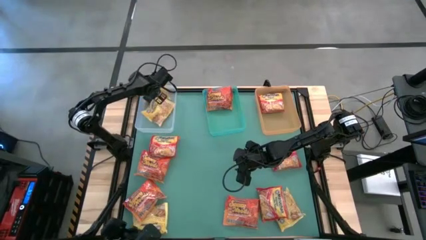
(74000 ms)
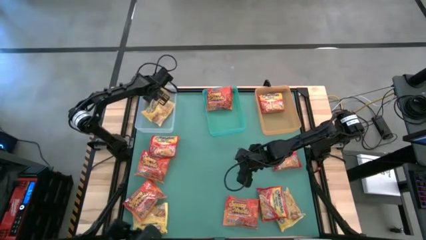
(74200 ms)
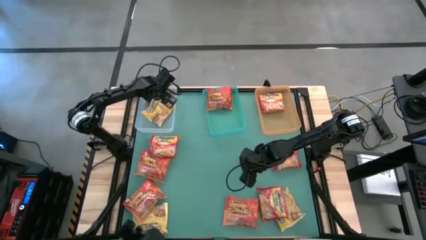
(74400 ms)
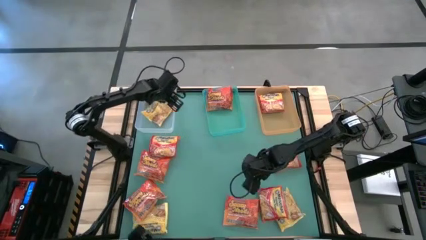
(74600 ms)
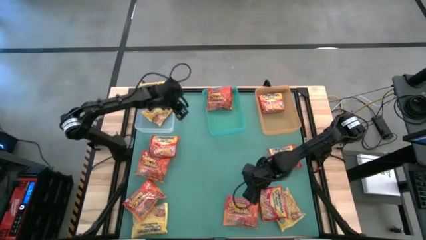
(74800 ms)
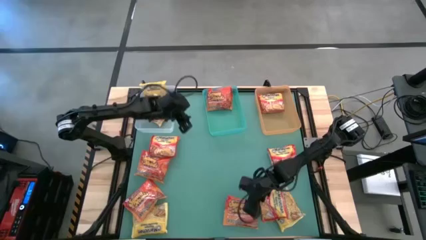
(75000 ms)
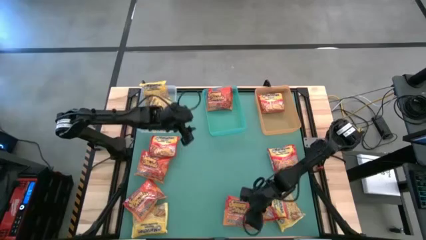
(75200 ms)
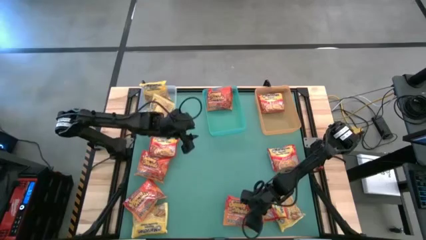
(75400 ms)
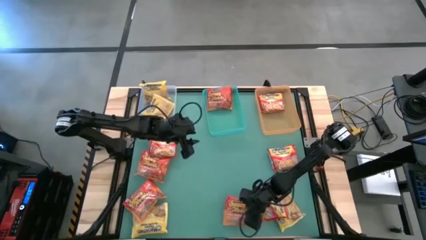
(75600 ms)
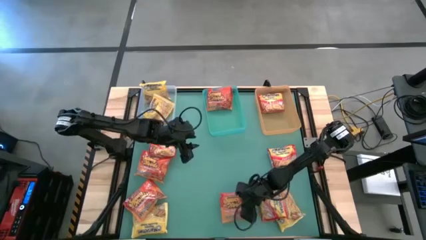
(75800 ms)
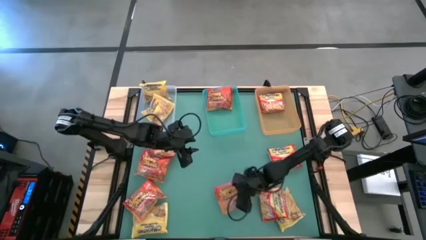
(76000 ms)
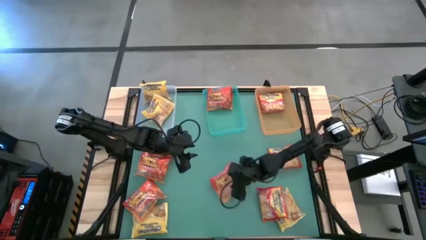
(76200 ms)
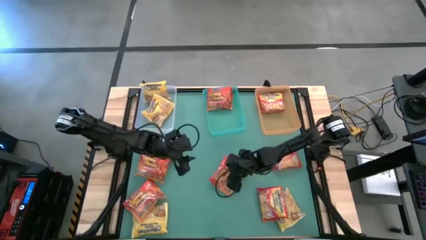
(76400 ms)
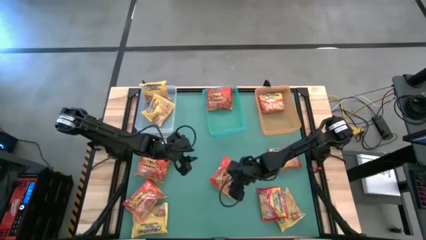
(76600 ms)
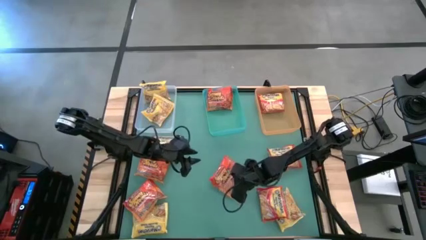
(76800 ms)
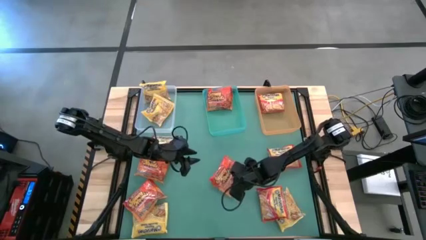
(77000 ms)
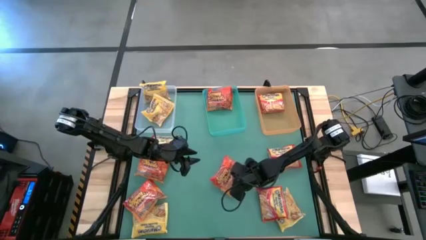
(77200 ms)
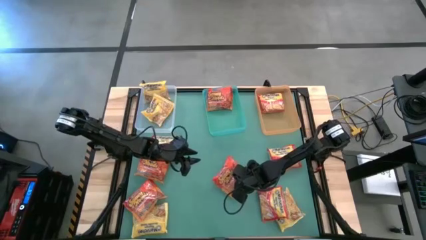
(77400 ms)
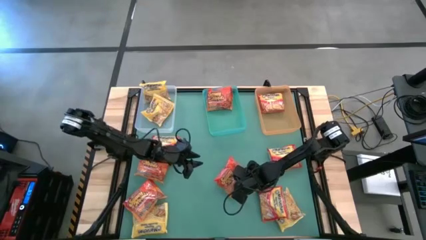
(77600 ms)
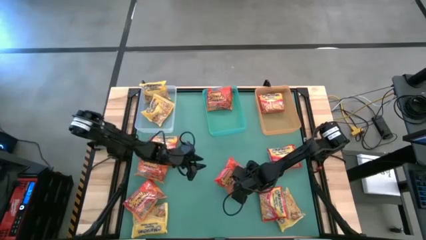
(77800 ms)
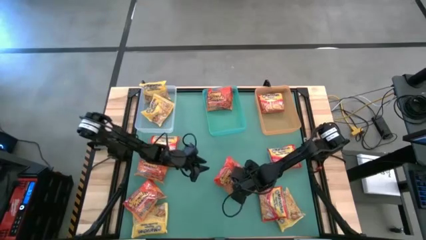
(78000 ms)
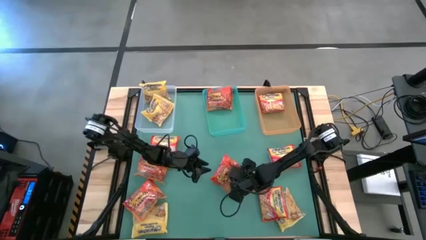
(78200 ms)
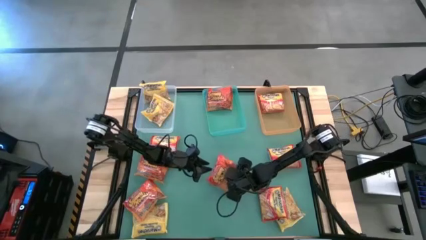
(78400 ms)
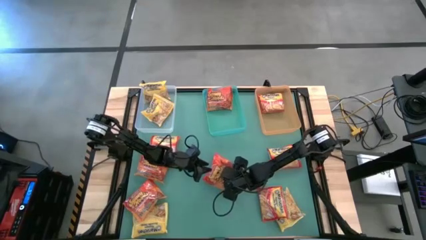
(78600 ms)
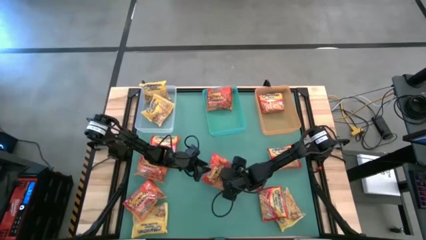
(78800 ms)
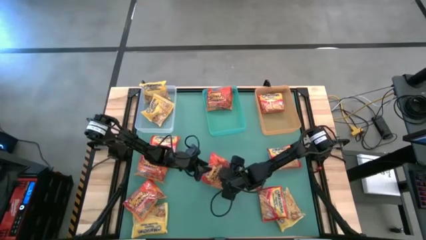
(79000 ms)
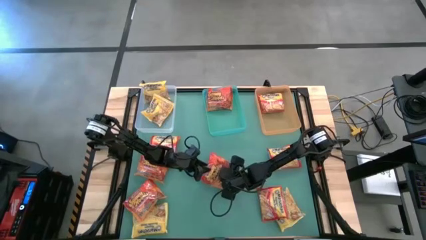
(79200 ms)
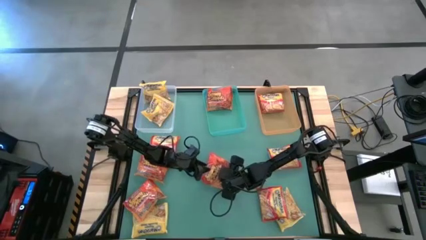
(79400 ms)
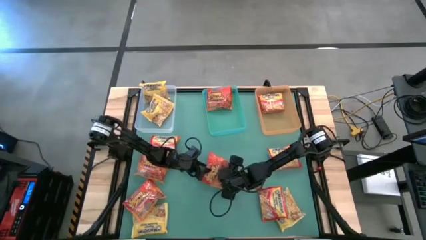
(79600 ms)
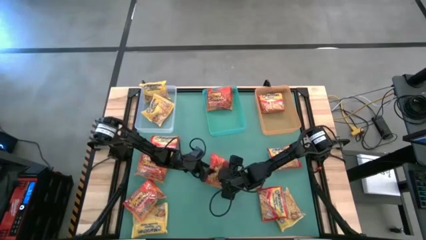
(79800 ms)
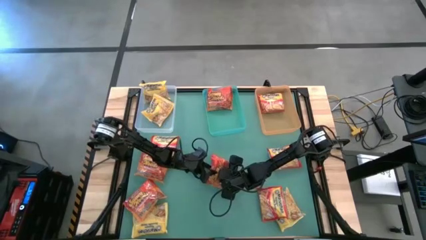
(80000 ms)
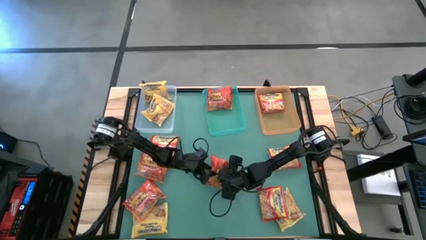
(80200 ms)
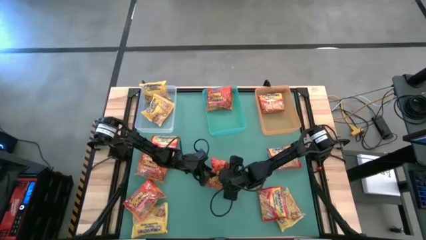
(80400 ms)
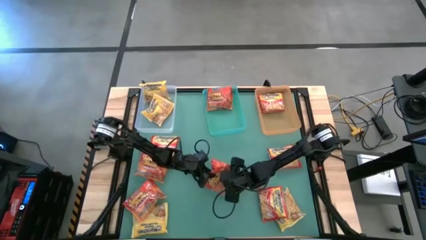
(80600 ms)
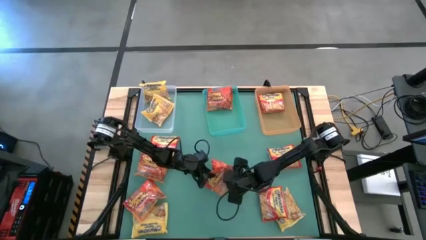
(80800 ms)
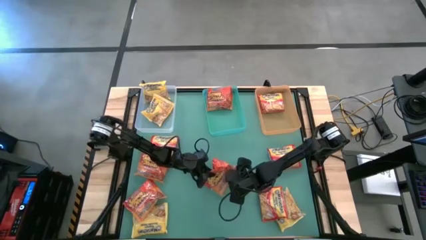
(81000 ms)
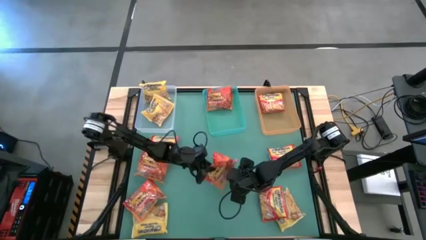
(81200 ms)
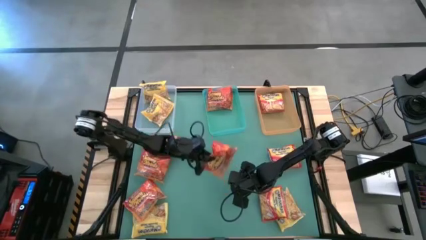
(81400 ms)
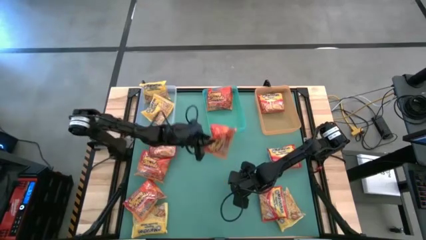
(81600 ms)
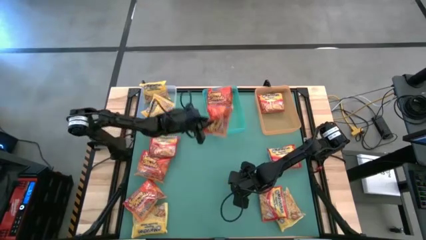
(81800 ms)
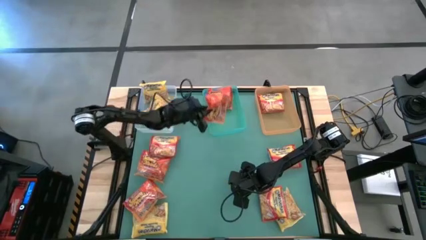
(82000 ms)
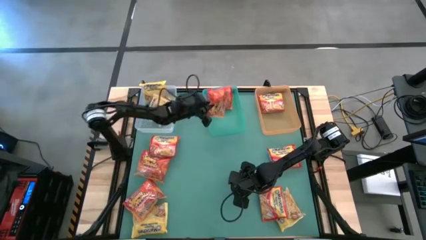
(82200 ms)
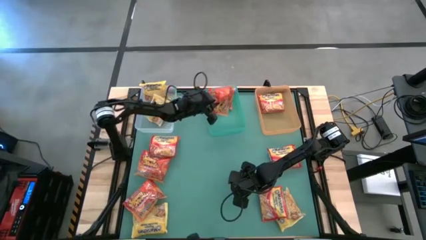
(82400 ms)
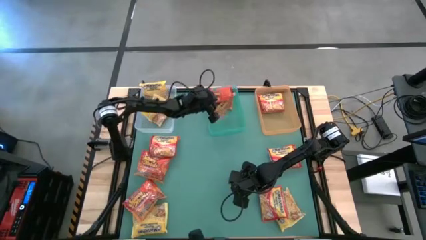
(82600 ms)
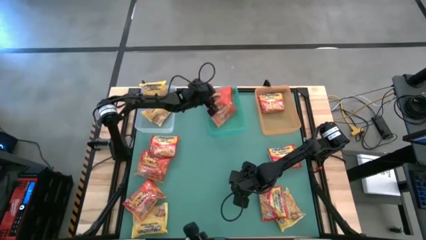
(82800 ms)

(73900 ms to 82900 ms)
Task: Sort Maruchan noodles
Put the red noodle pack into the green bin

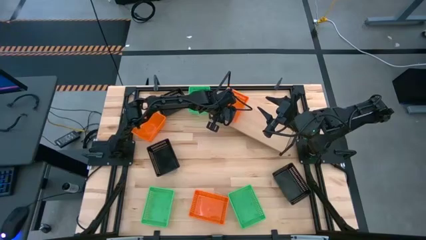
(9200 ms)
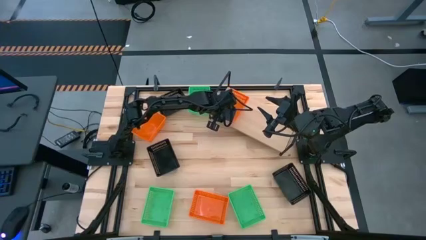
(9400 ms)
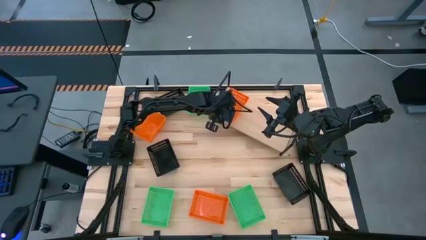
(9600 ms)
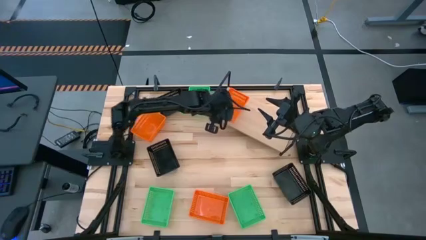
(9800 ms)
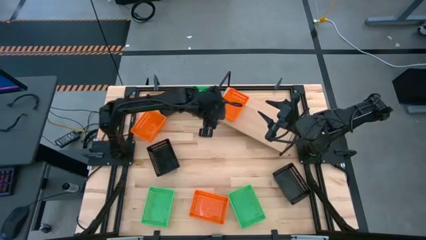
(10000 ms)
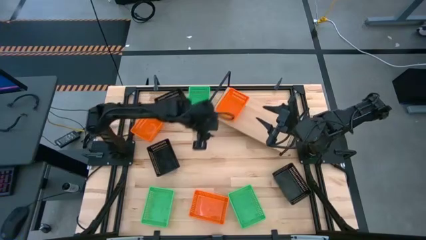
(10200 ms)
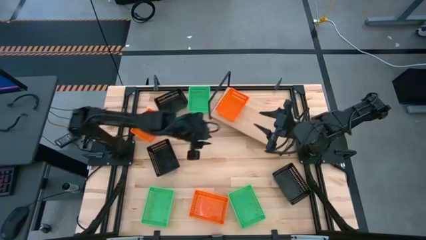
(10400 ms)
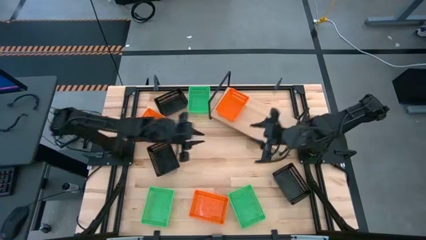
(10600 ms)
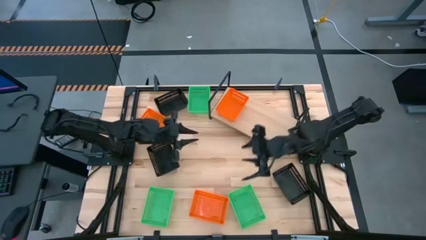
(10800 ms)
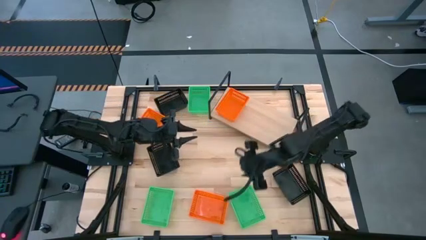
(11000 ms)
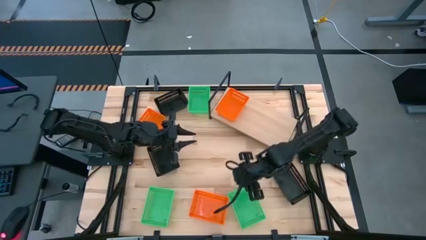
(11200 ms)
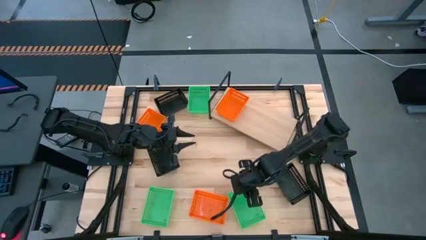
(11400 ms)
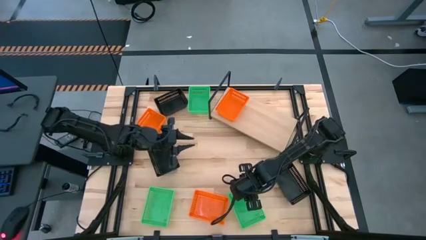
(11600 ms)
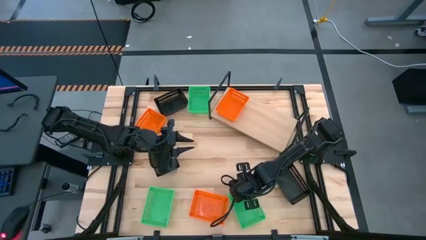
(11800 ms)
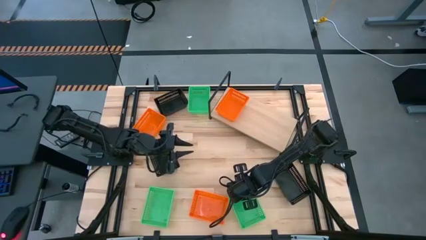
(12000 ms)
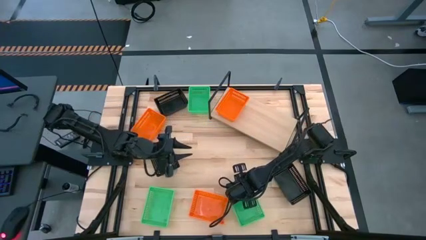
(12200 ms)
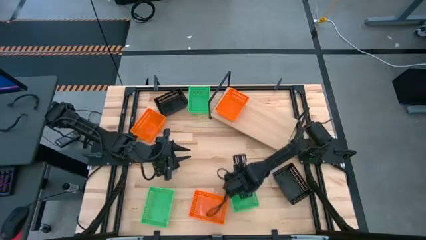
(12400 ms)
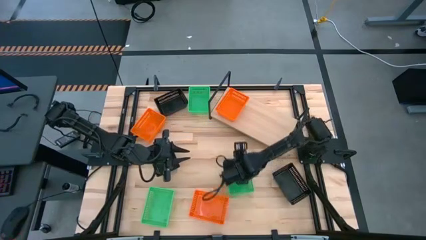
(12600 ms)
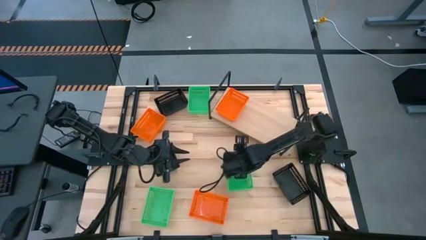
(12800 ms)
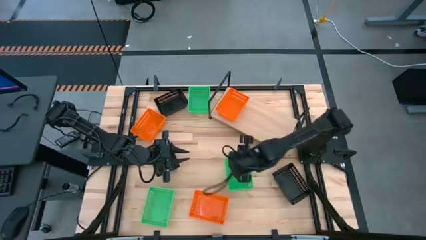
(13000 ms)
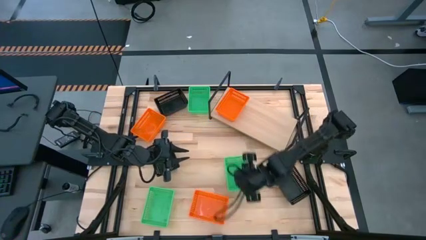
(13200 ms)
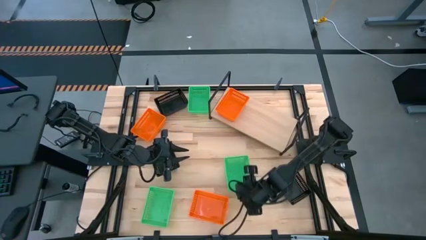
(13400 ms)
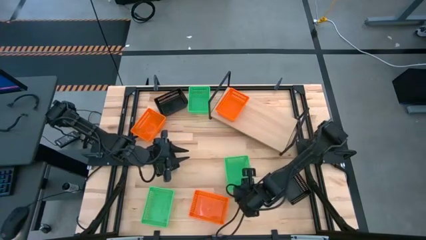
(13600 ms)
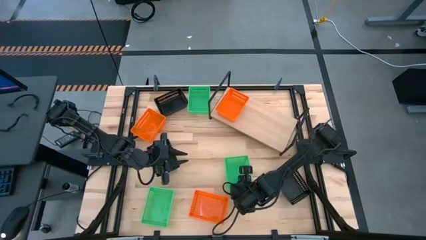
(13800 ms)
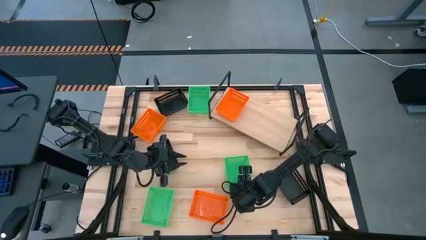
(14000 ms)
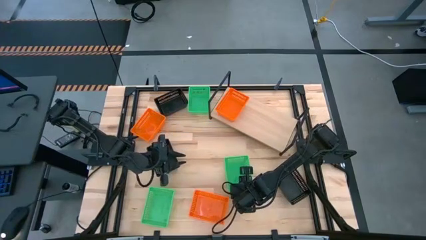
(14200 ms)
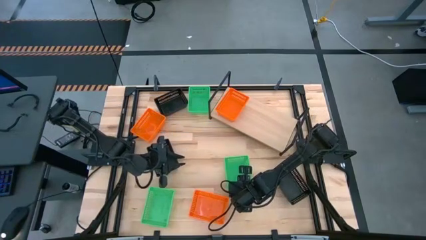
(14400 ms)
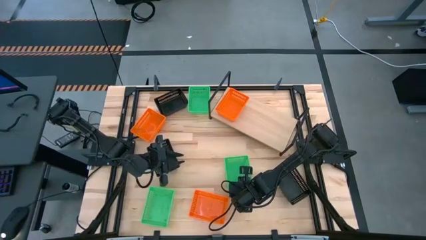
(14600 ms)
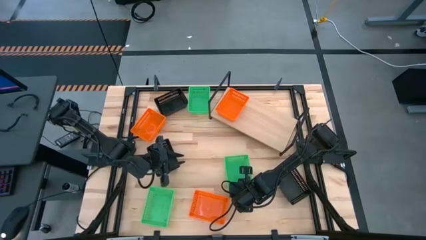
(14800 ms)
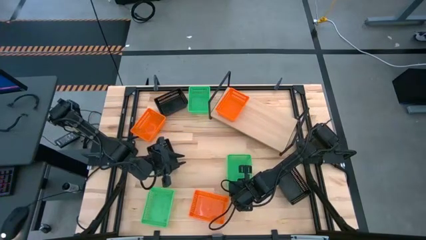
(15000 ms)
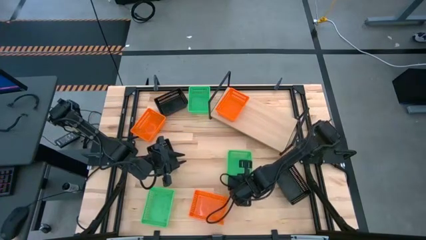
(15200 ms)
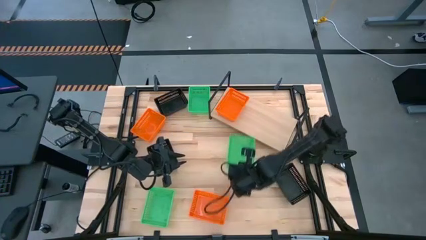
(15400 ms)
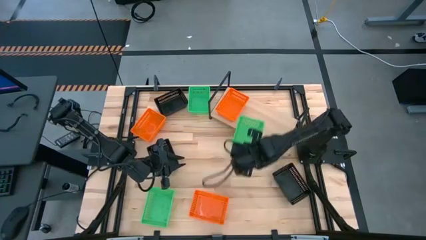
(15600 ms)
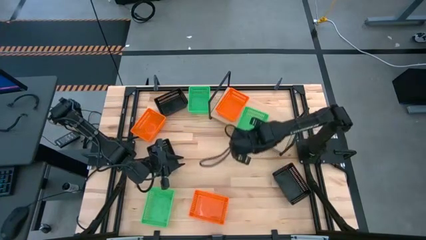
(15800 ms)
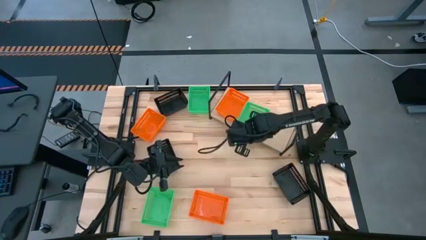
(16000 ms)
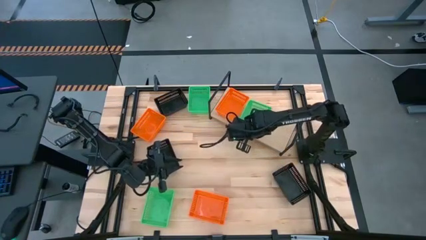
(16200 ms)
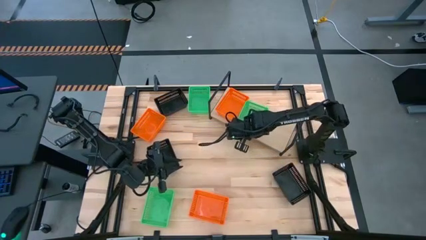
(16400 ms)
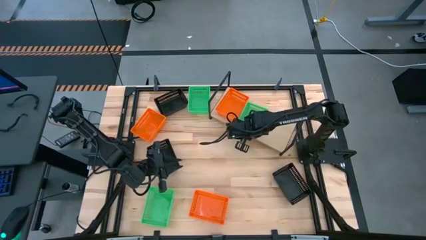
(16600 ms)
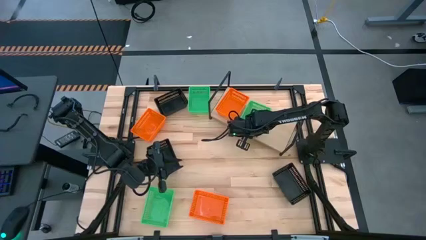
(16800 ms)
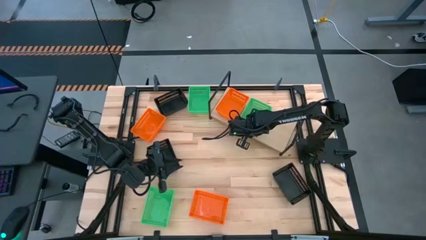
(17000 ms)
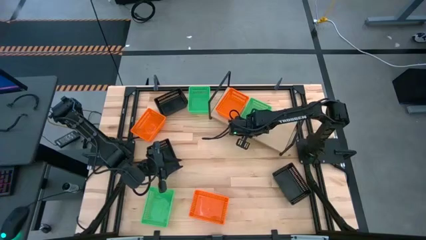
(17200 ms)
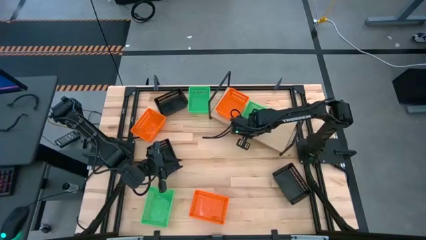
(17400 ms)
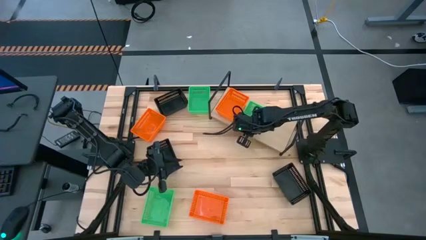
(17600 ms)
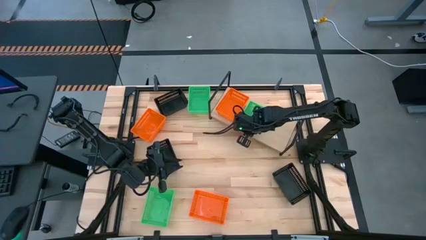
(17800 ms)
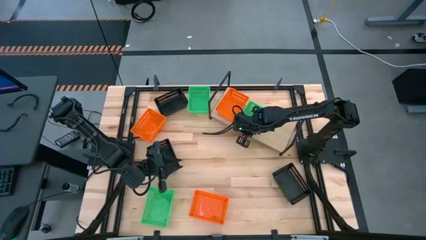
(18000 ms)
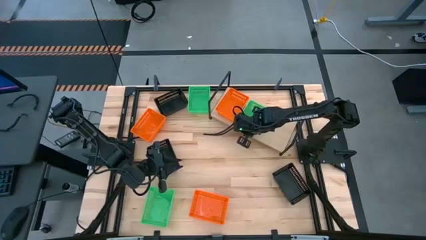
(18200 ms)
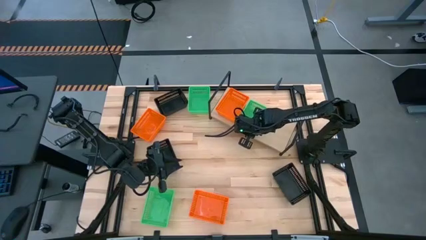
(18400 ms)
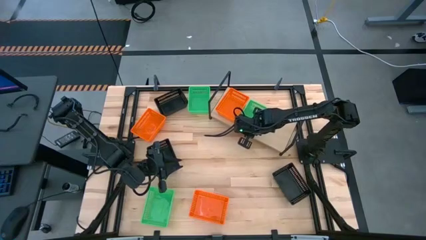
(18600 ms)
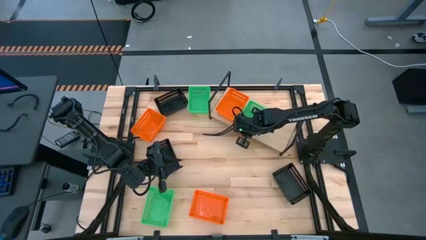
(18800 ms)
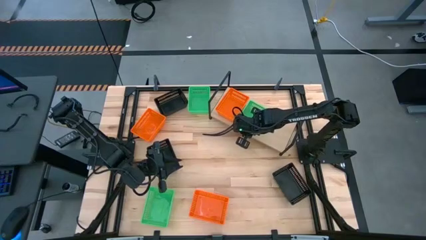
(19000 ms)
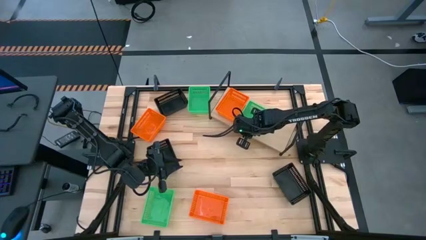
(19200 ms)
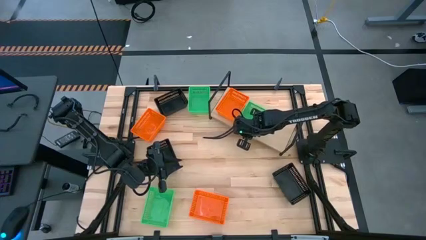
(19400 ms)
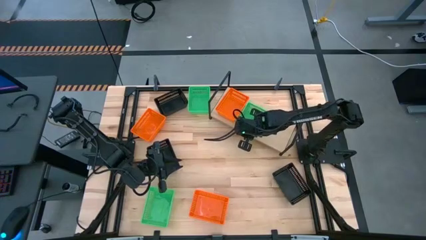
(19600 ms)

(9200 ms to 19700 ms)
Task: Stack baskets on shelf by color
Put the bottom right green basket on the shelf
